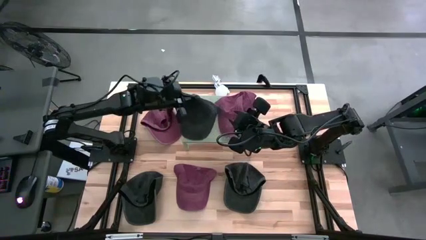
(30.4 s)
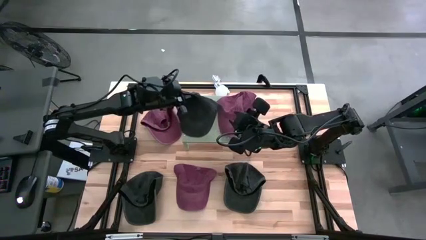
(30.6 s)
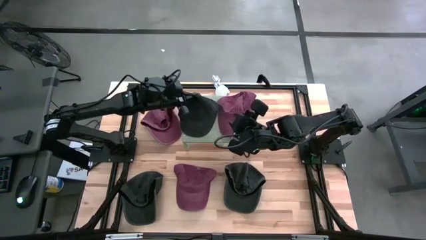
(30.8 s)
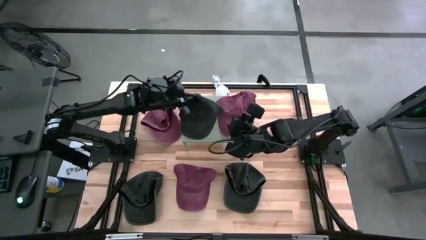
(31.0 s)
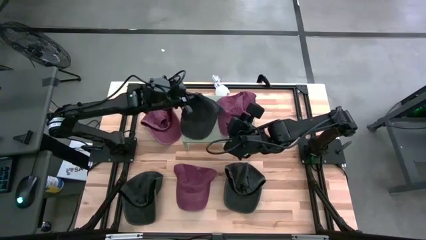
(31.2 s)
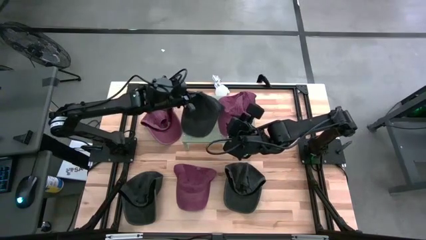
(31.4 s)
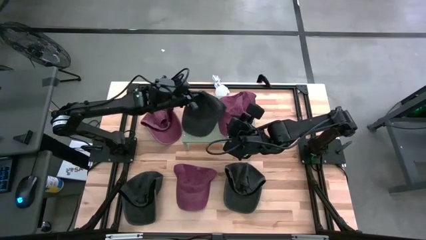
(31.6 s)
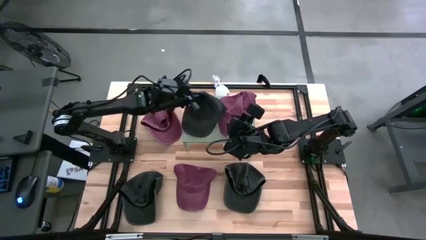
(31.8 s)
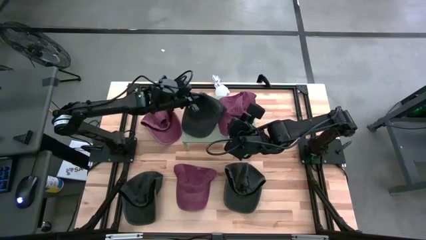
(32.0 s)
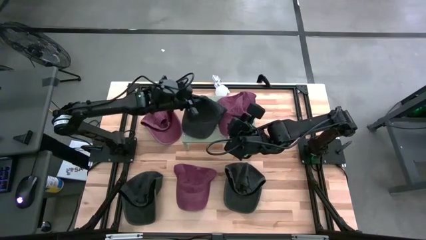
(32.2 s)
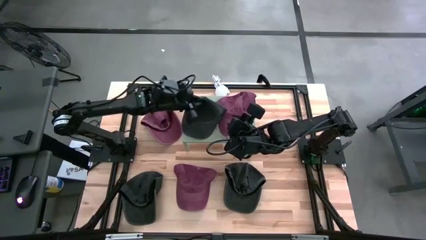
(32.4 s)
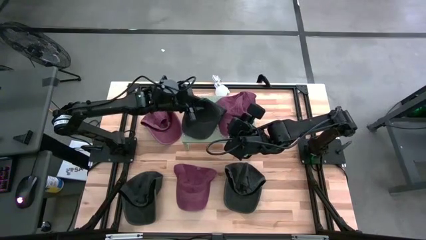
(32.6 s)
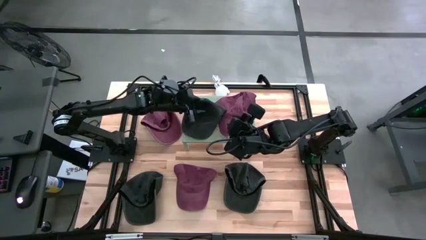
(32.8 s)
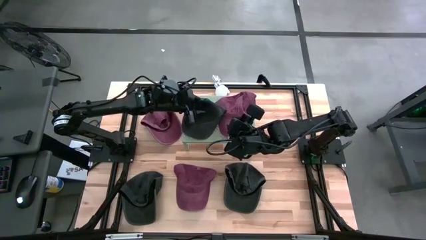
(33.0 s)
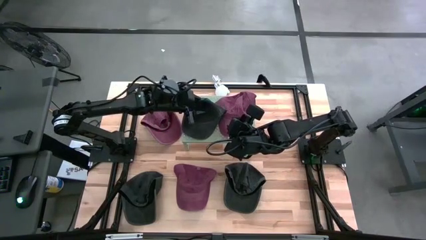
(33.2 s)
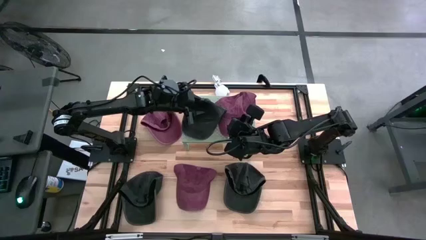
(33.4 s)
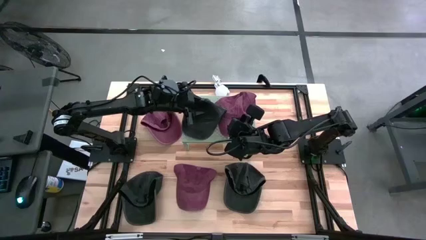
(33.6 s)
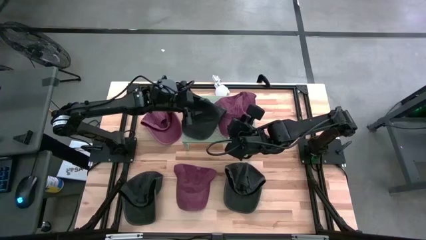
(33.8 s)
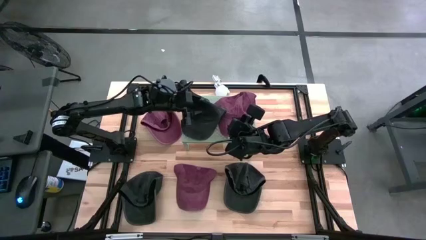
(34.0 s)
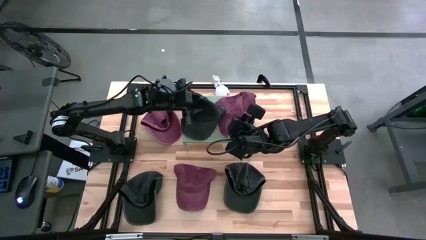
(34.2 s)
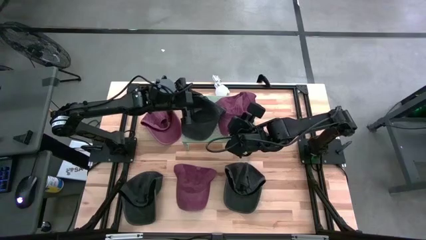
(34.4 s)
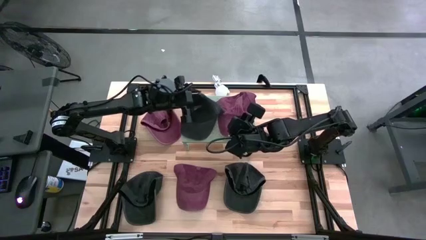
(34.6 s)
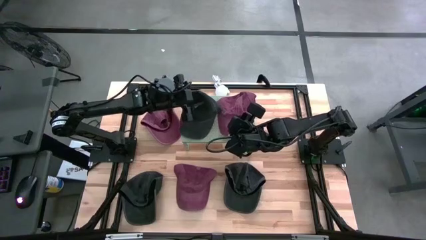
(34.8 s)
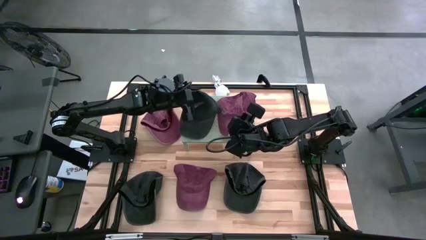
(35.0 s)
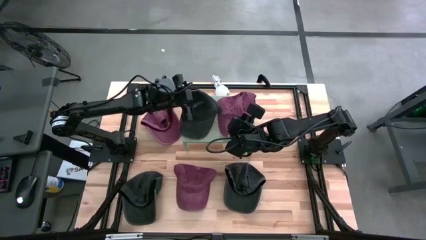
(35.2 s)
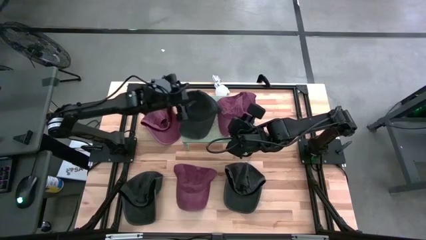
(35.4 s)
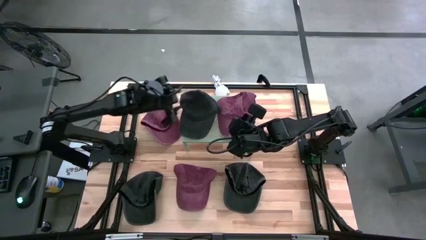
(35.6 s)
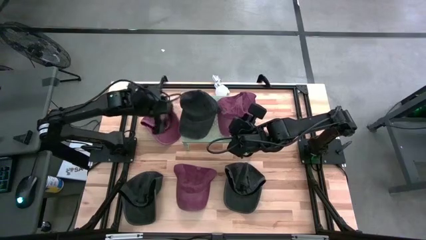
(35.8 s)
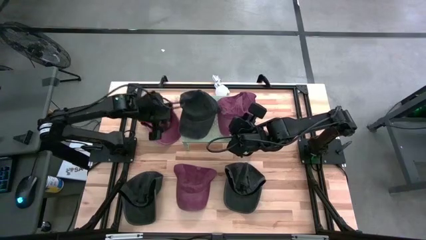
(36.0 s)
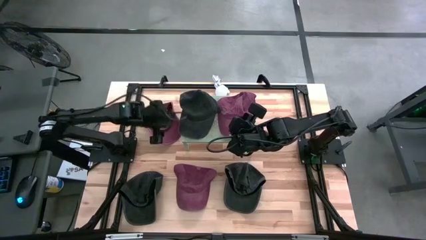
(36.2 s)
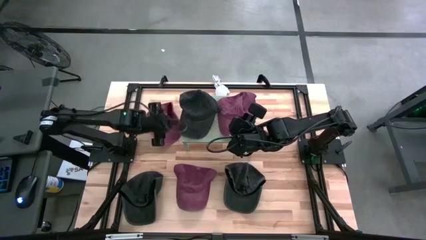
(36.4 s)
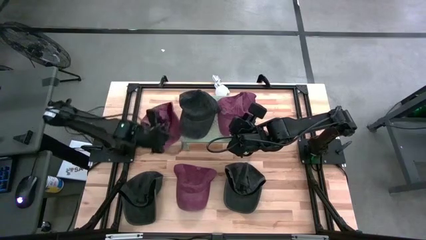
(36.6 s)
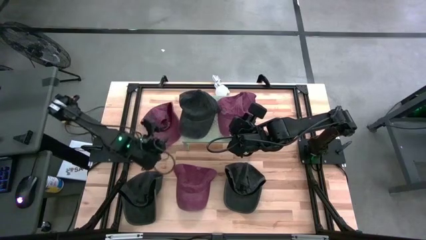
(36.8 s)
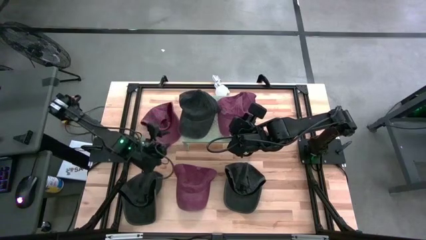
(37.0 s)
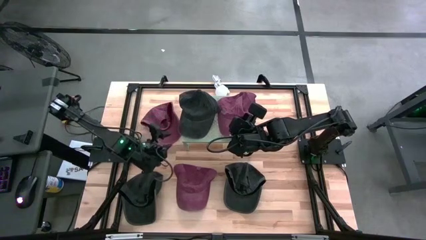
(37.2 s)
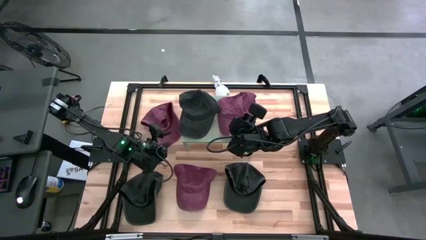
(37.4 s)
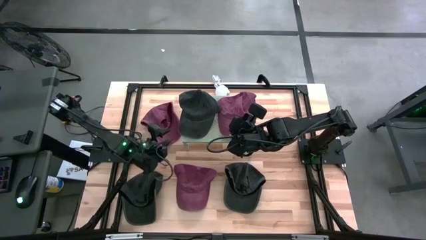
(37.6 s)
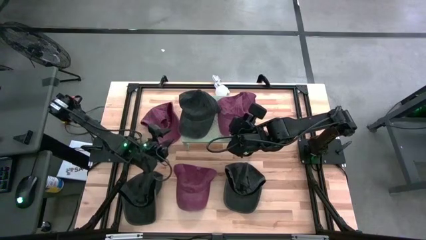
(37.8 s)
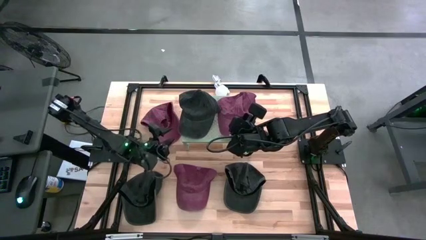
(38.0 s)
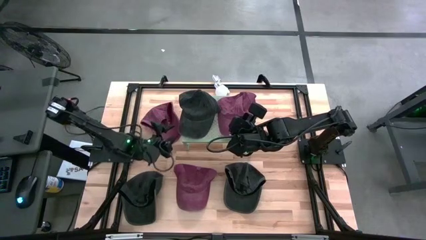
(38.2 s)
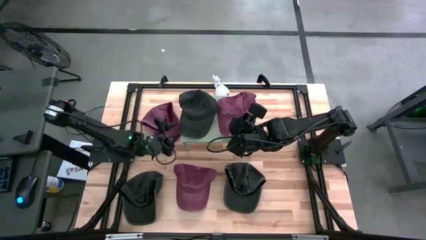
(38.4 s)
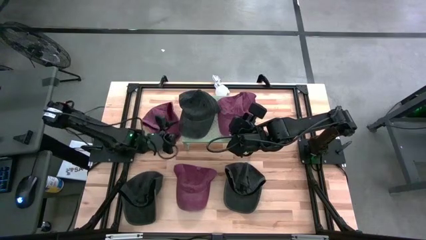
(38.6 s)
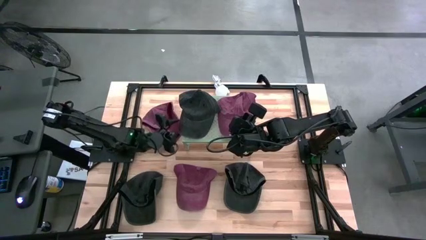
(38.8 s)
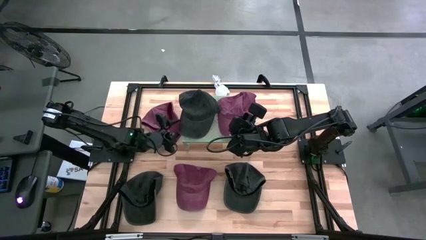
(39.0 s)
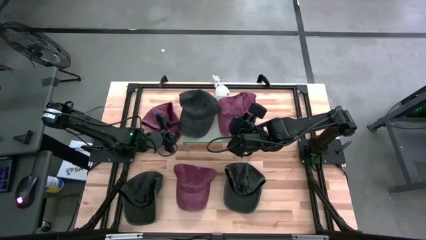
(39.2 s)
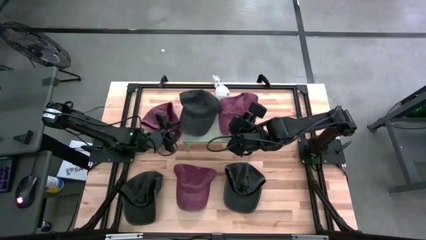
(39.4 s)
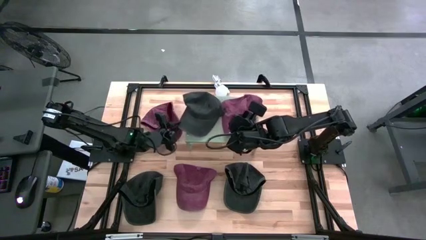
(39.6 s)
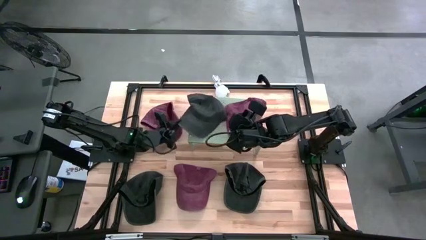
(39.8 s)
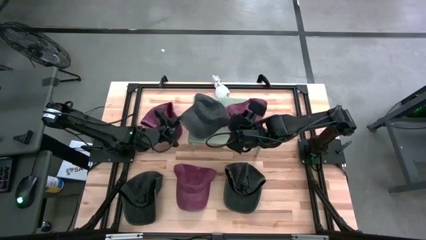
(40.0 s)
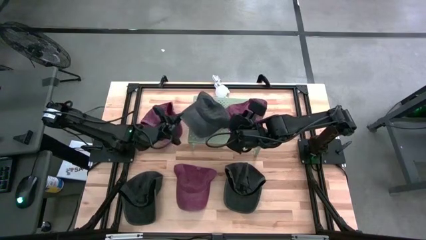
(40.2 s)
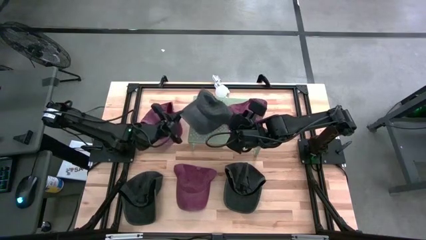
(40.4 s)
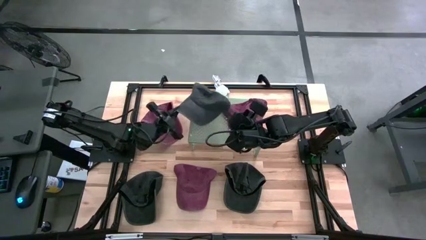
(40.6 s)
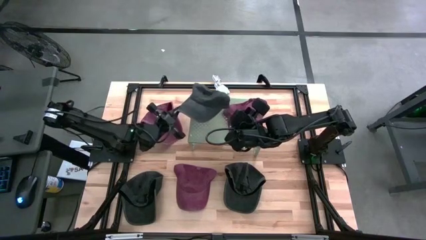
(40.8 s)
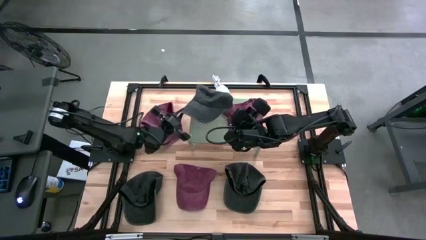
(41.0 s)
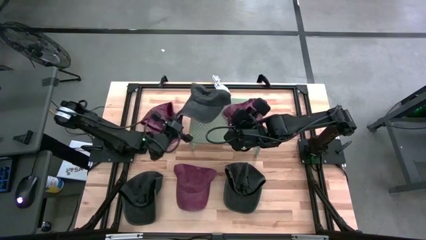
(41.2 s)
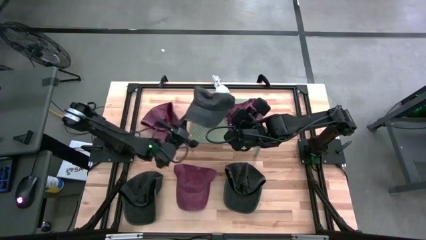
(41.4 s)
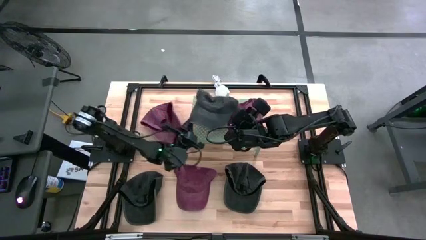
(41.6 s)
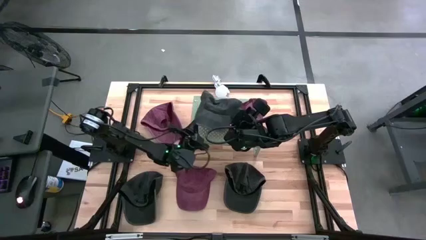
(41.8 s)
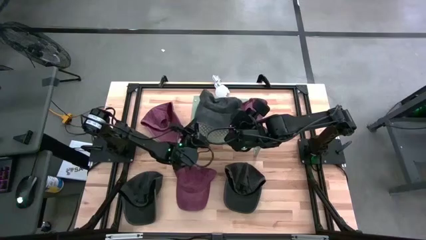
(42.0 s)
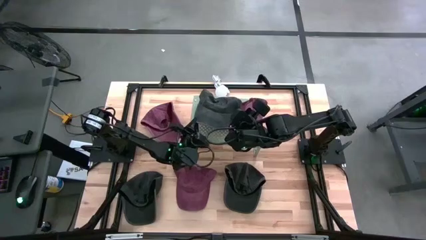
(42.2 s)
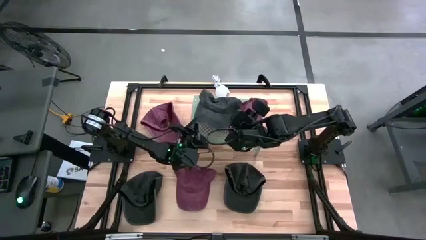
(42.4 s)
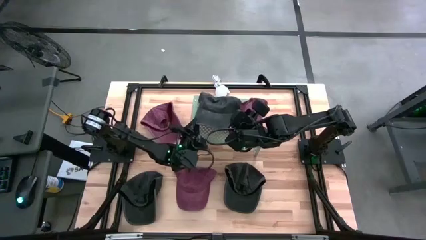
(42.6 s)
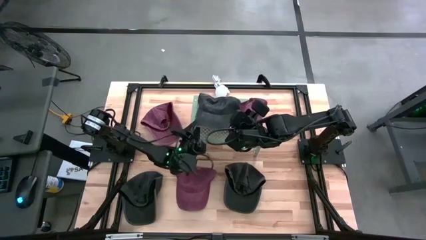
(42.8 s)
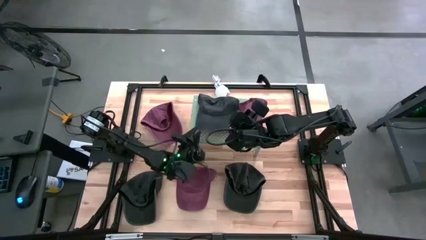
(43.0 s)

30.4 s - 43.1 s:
Task: Pick & Place hat
Put the right black cap on the shelf

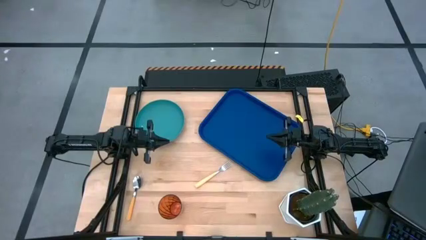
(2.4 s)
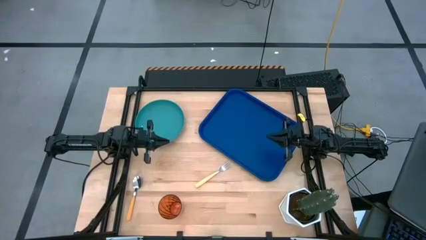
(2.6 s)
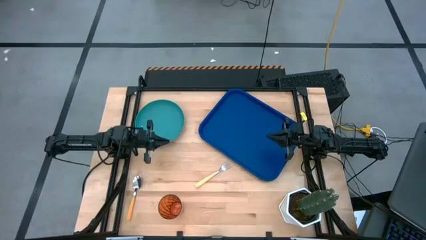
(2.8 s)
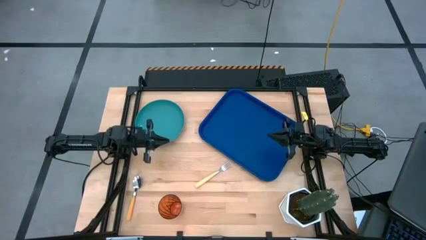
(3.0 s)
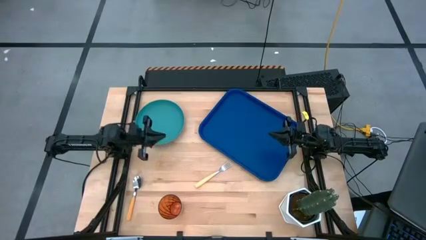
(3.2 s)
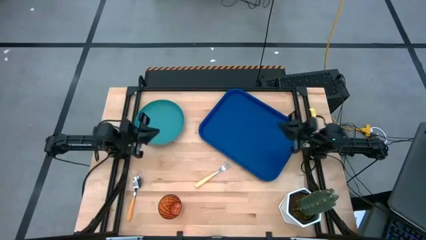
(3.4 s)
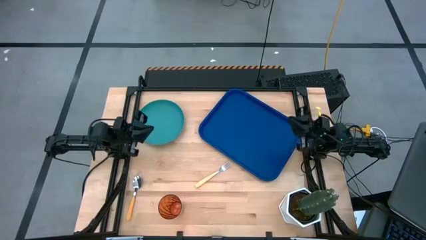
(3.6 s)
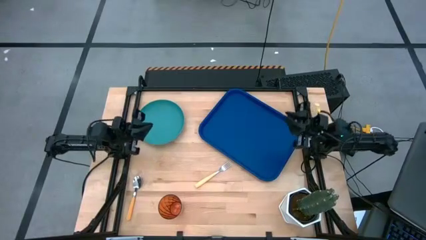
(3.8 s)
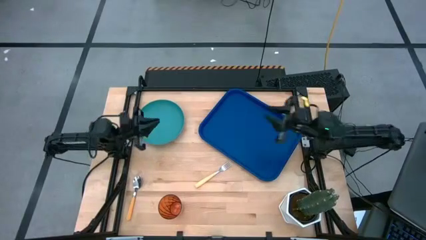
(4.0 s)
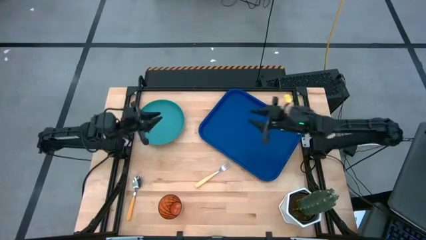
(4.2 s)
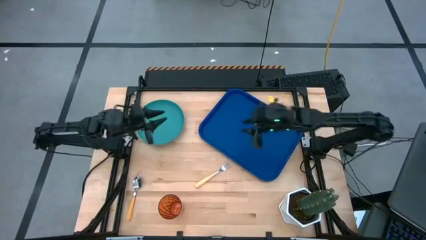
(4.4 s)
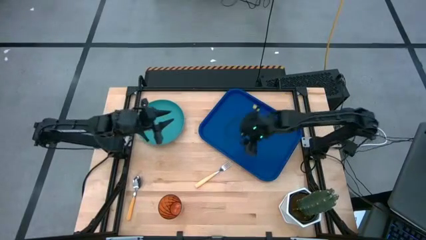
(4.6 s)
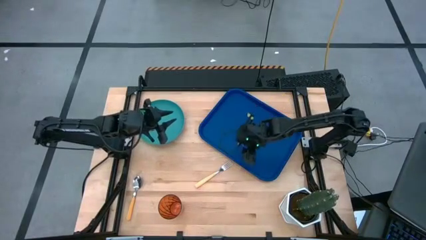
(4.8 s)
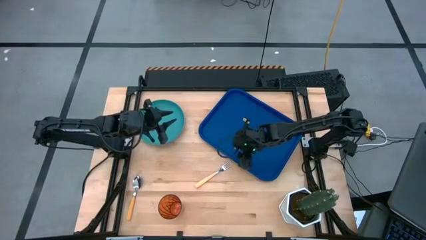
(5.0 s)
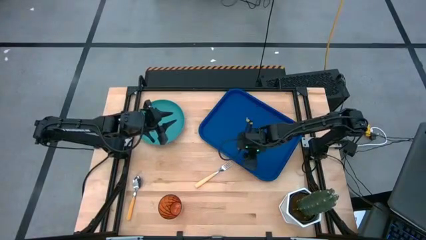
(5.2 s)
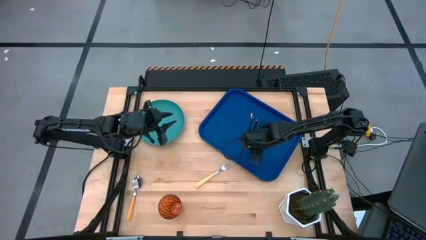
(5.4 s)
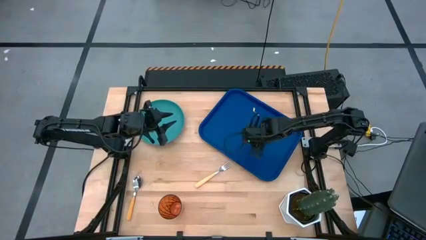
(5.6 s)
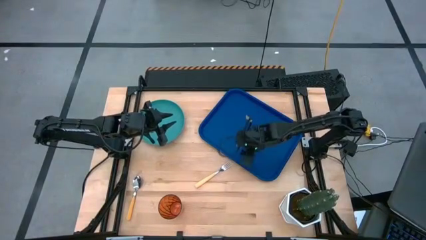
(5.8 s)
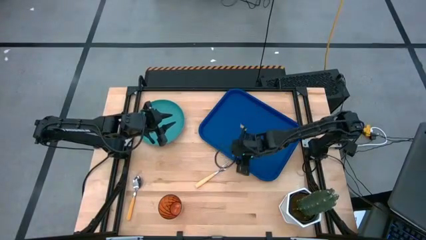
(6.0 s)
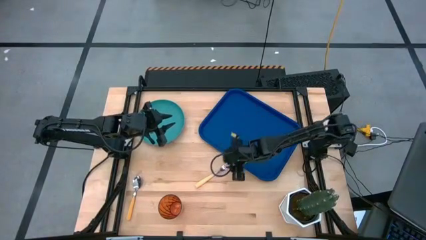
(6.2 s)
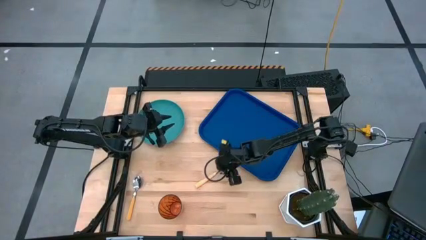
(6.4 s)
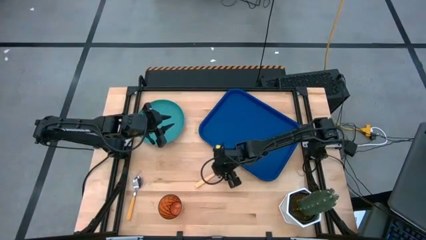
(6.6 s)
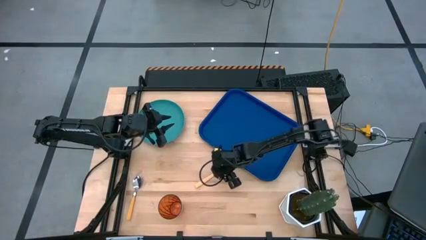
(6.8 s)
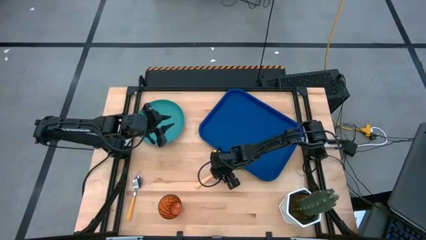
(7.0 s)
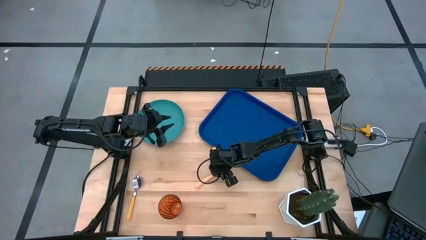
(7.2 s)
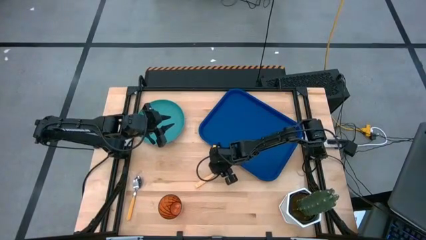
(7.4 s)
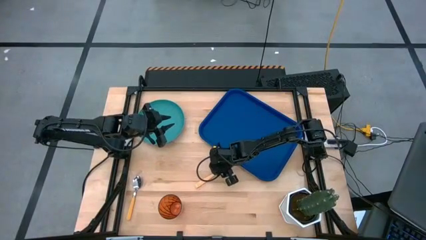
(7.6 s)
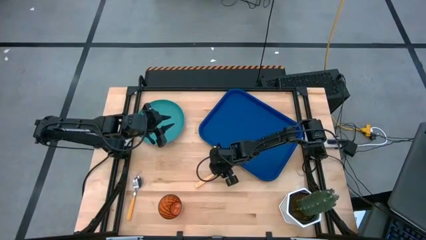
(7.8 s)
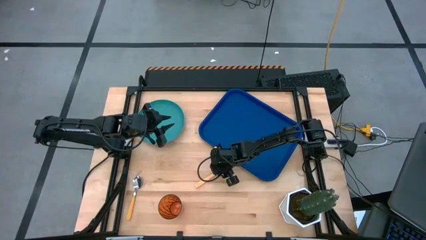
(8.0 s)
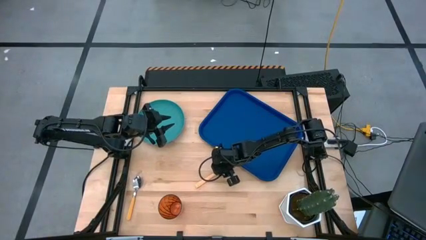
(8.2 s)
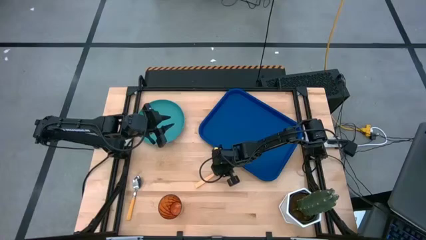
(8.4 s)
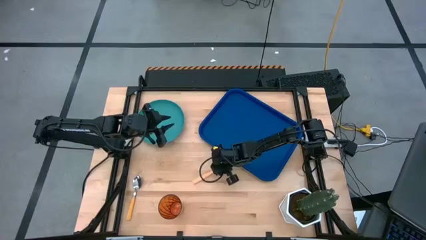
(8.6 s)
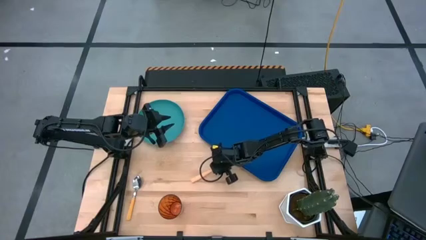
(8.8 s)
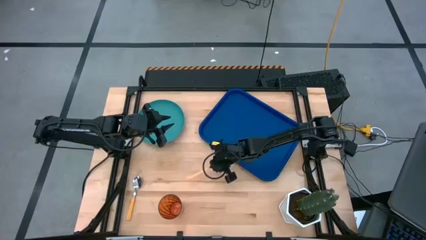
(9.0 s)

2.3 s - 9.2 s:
Task: Pick and place plate/cup/fork/spoon on tray
Put the yellow fork on the blue tray
